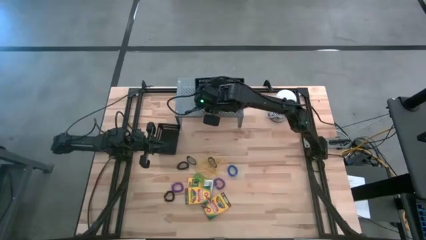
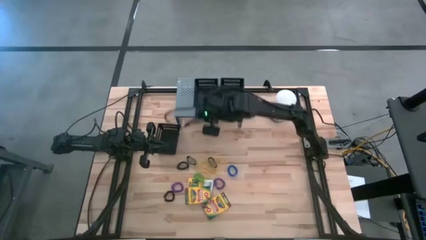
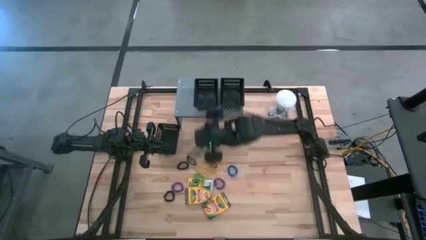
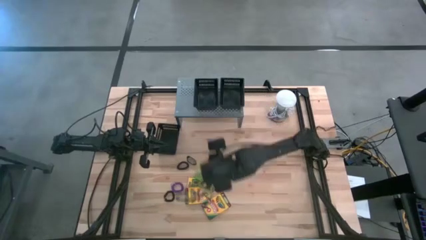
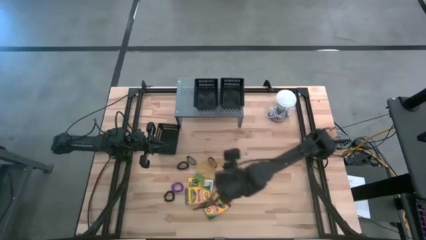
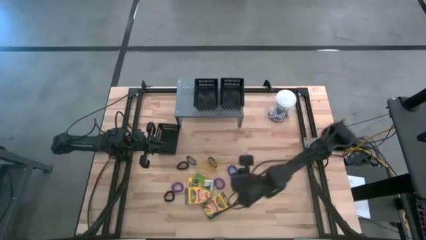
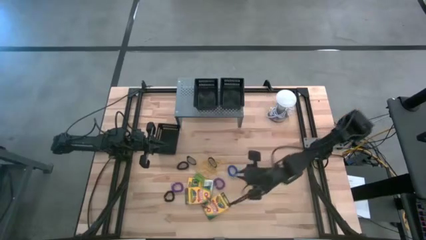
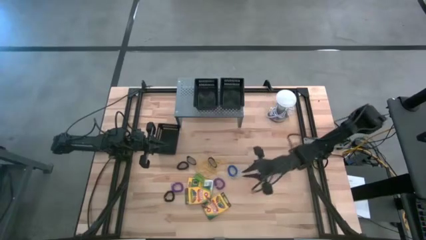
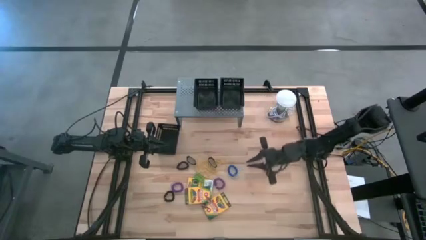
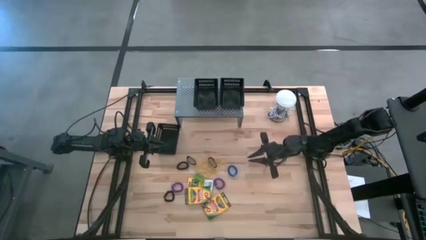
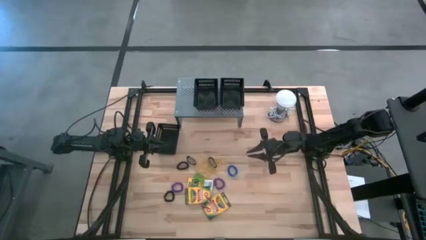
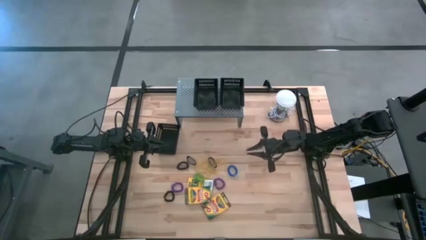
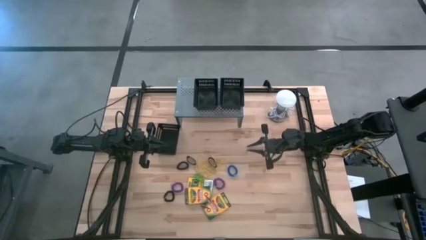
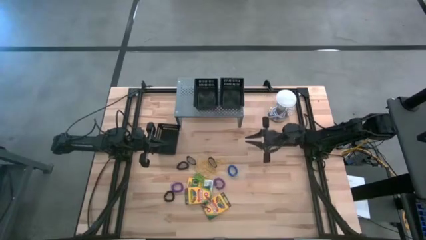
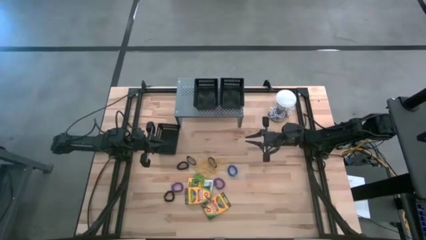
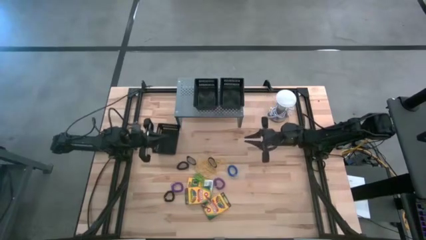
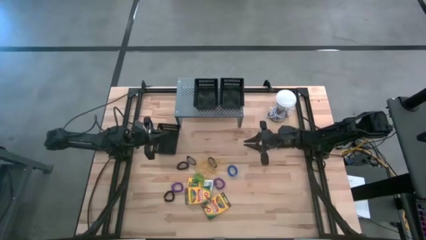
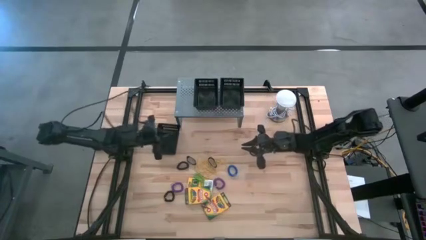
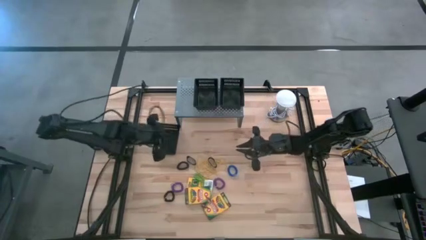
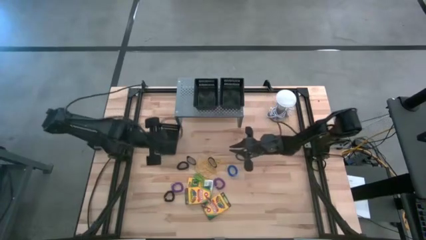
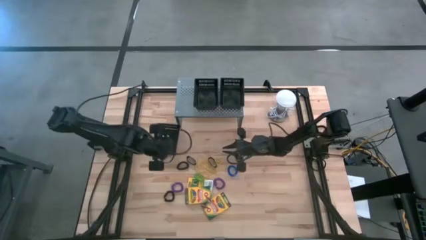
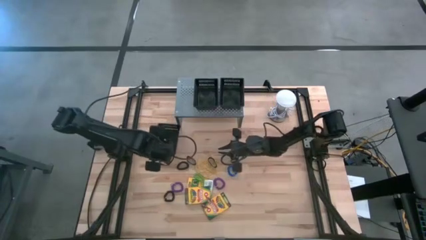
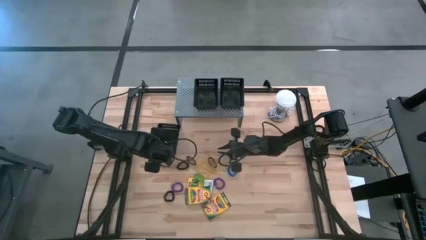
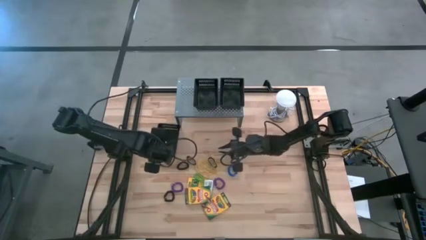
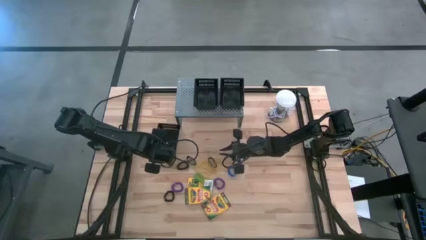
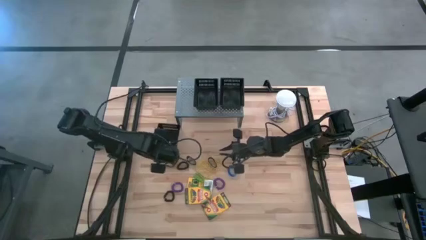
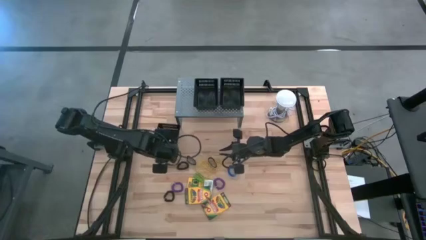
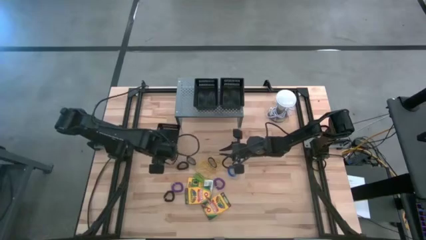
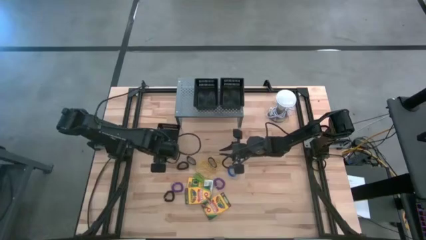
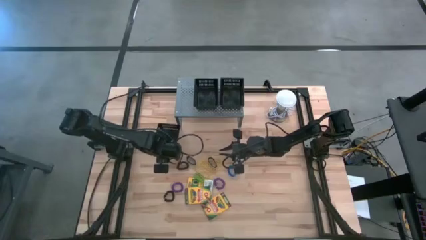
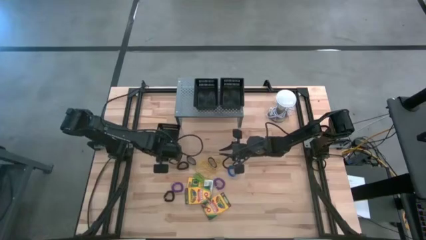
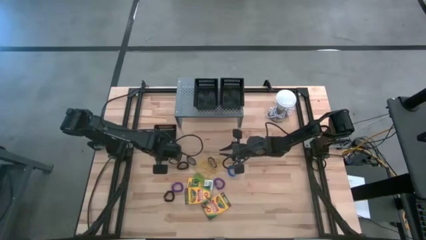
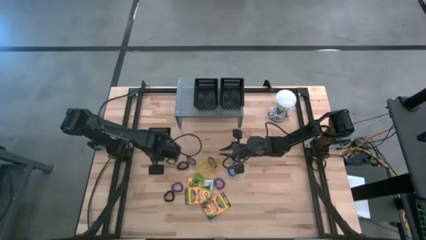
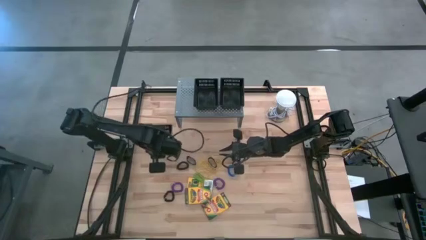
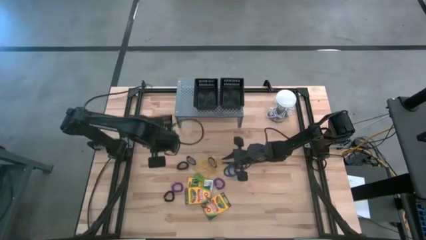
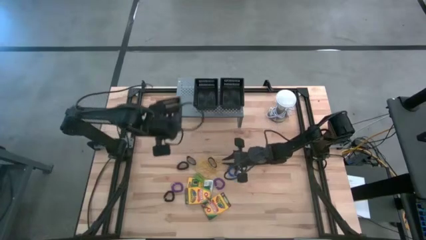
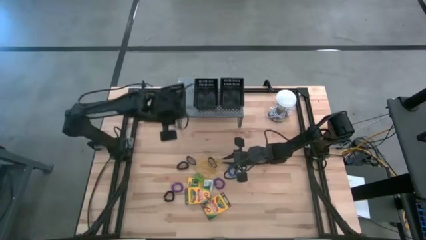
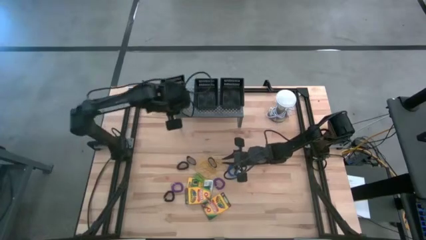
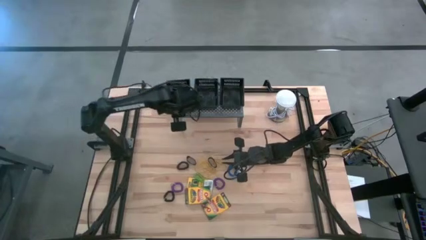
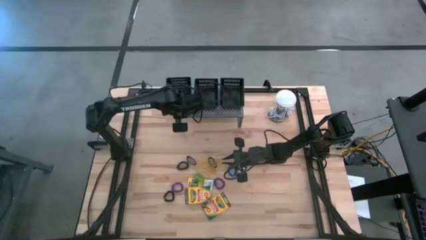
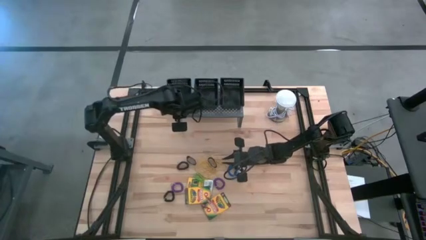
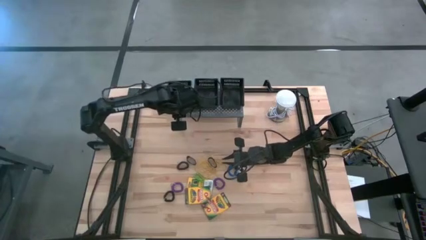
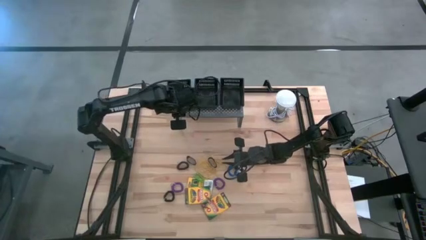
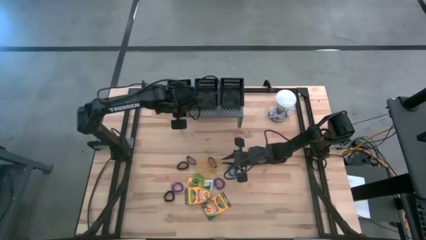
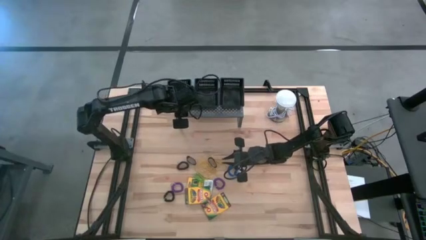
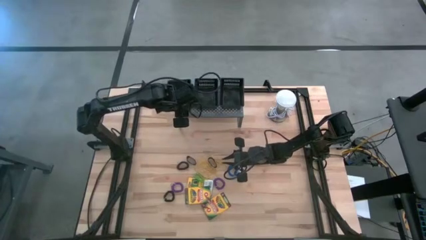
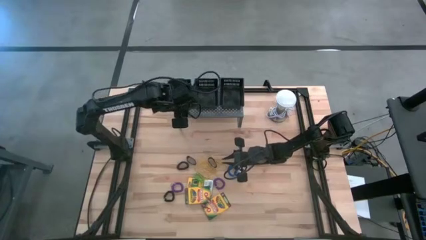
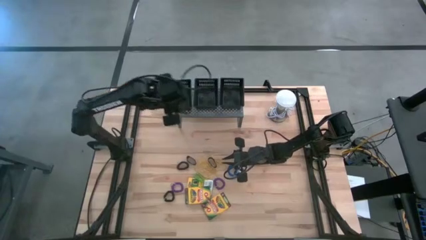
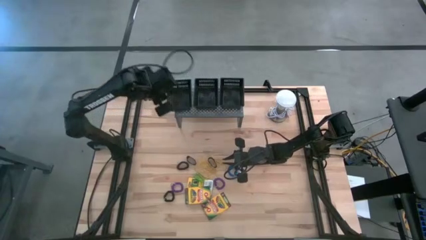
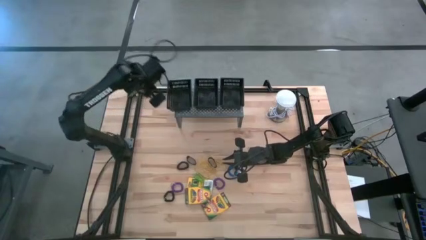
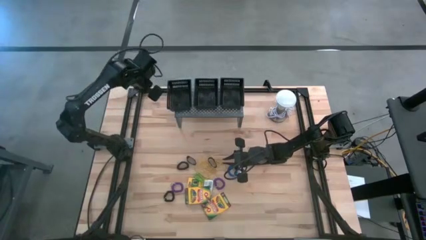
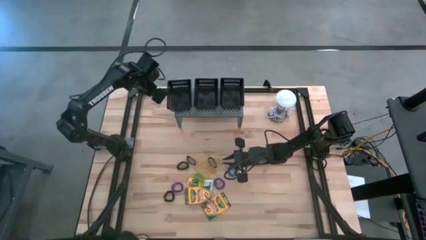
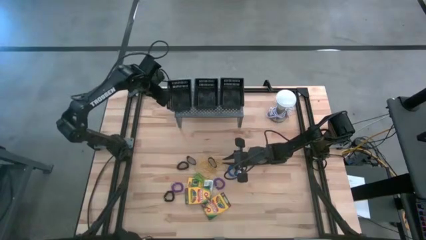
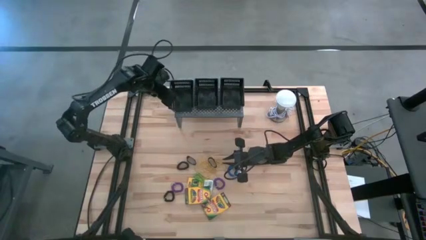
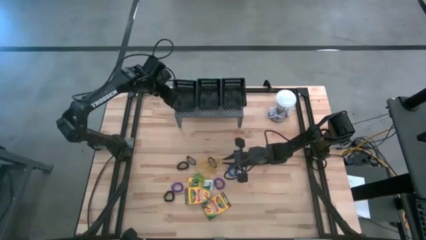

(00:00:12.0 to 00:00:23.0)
Task: Pick & Place Office Desk Supplies
Align the black bin on the shelf with the other black bins

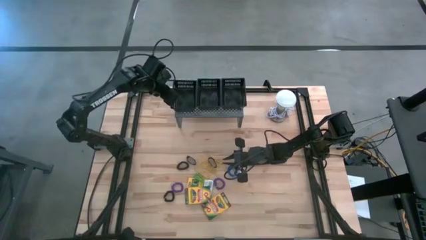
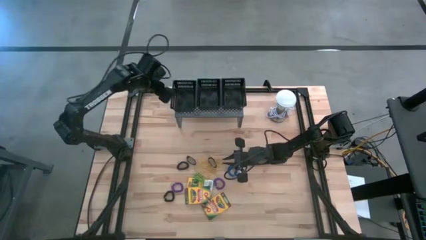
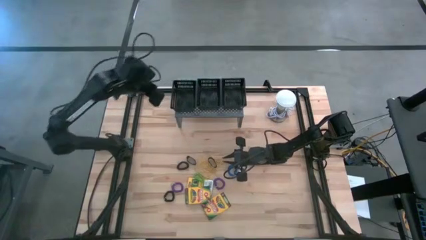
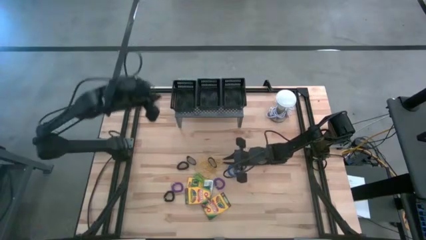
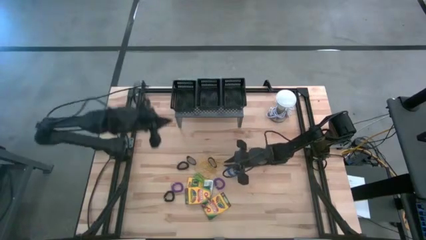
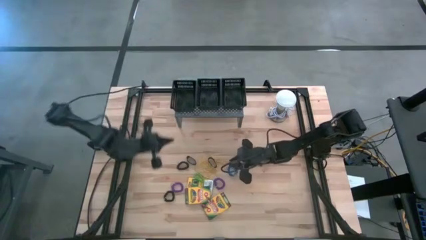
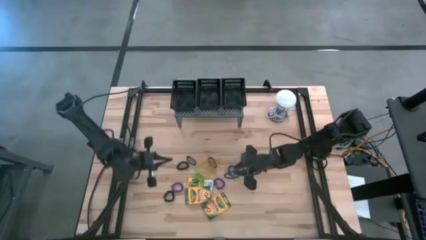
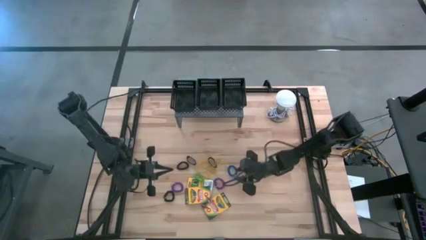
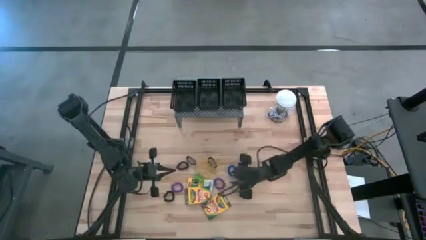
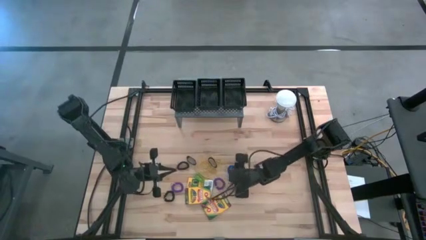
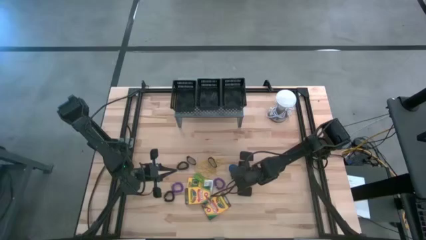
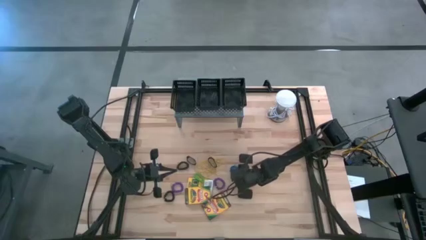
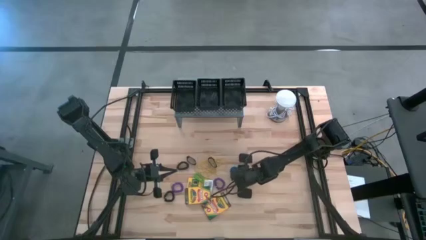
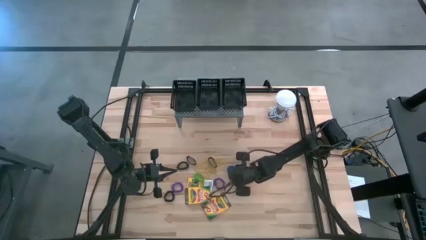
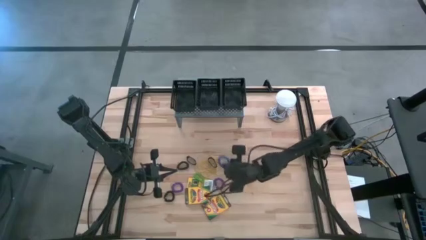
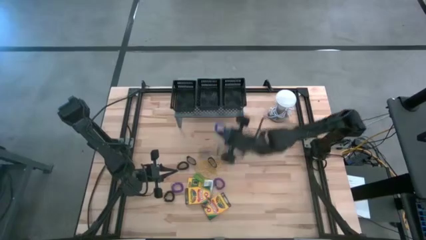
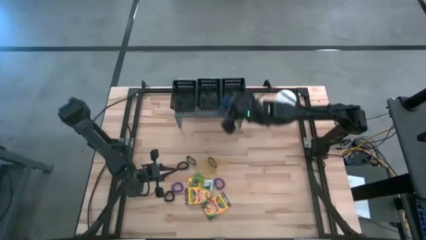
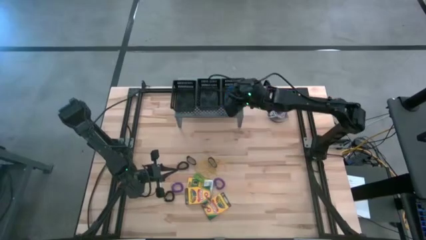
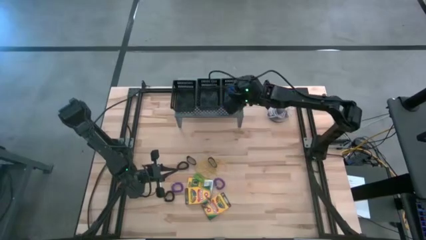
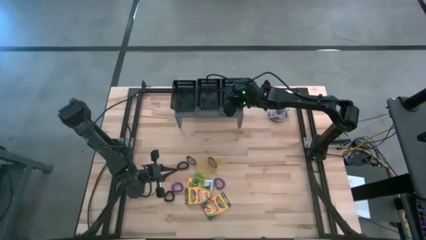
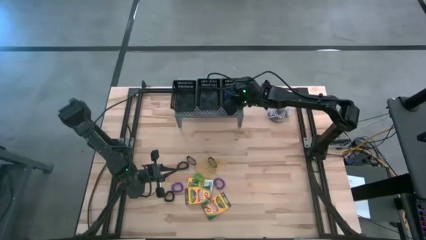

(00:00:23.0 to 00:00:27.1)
Put the blue spring keychain in the right black bin on the shelf

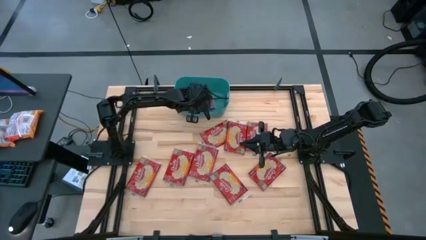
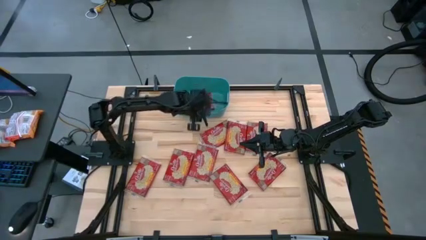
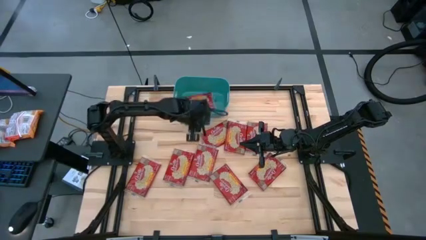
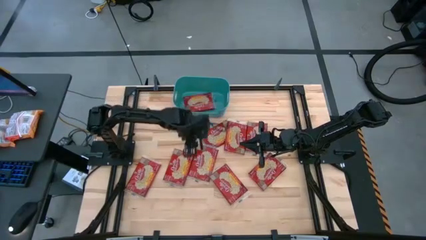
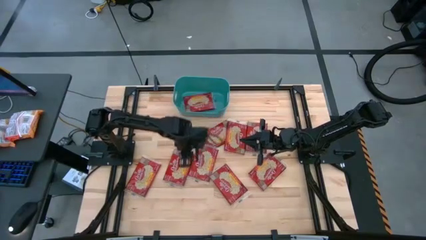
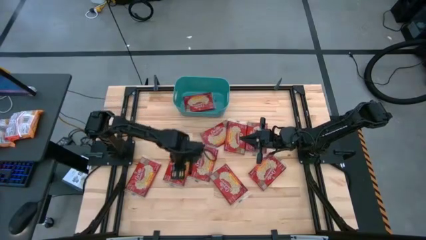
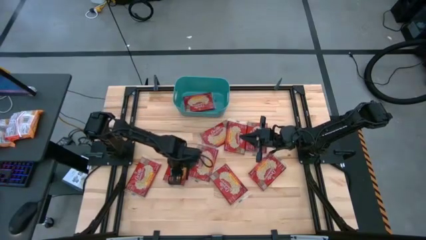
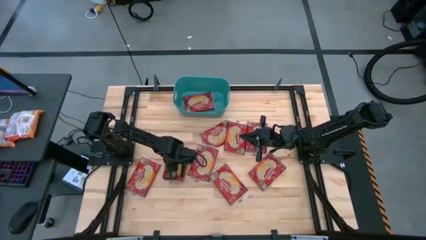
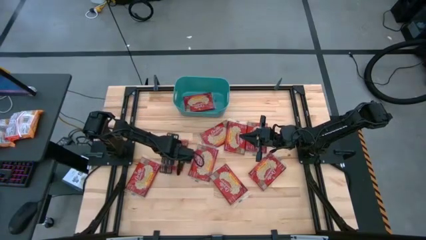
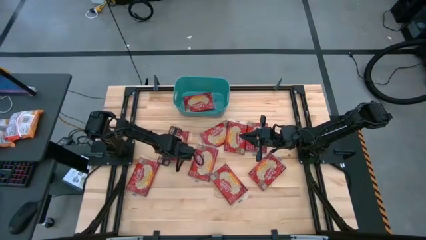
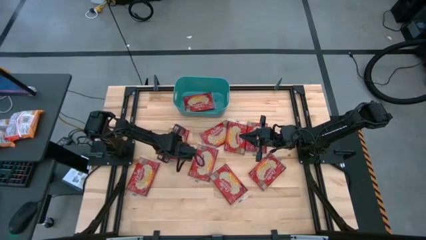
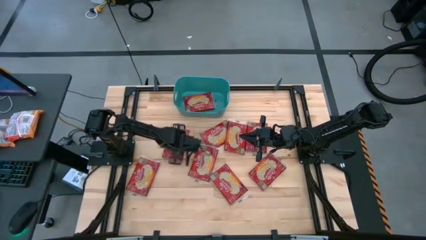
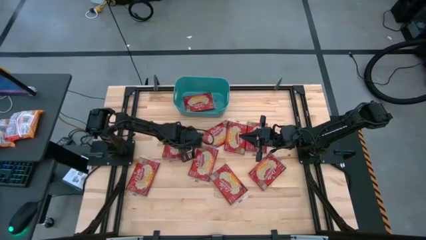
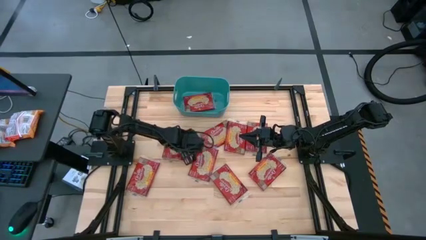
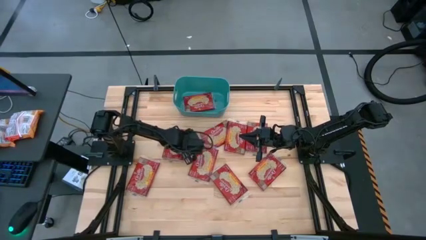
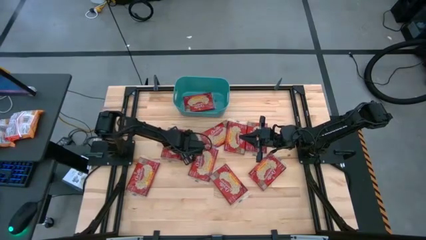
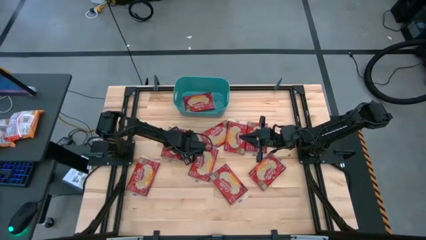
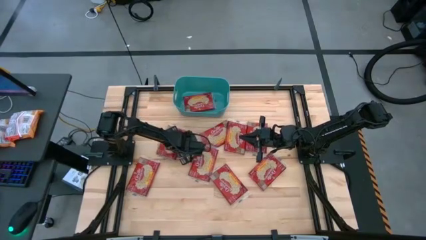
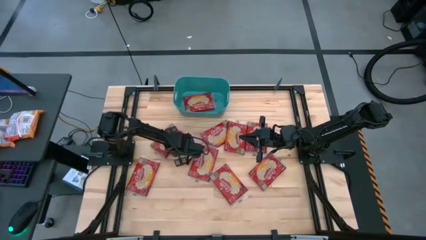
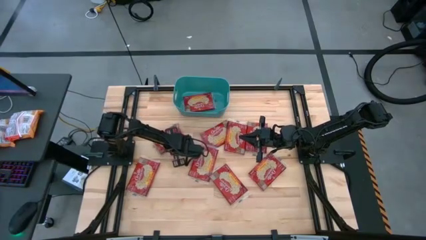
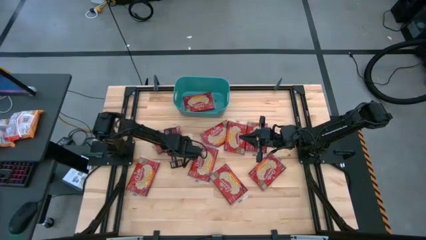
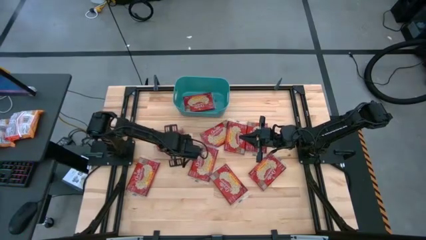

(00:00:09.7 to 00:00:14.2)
Task: Sort popcorn bags into baskets
Put the popcorn bag into the green bin
